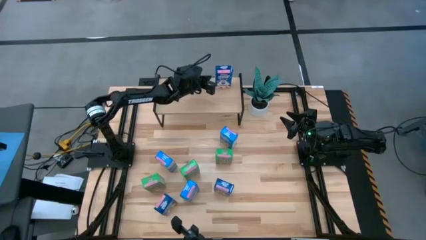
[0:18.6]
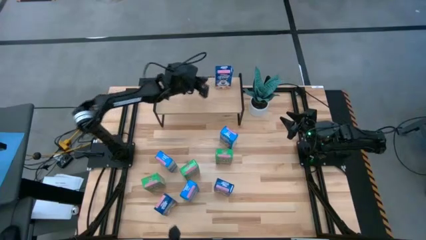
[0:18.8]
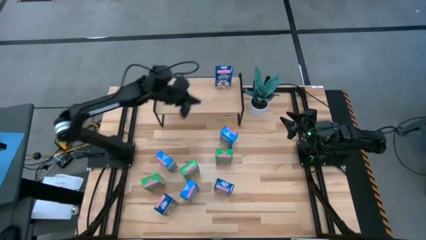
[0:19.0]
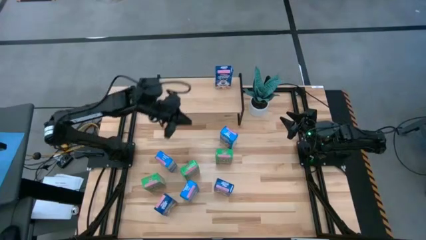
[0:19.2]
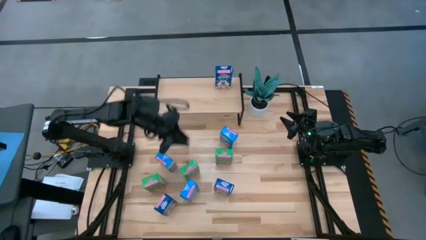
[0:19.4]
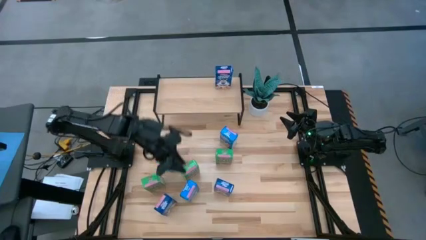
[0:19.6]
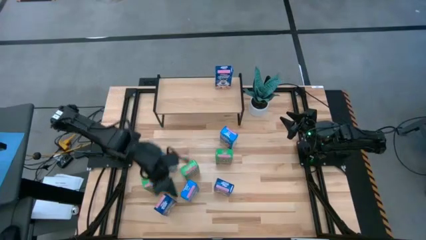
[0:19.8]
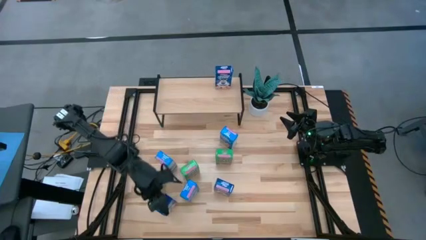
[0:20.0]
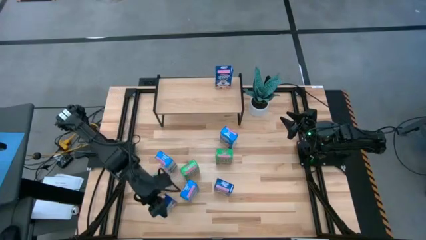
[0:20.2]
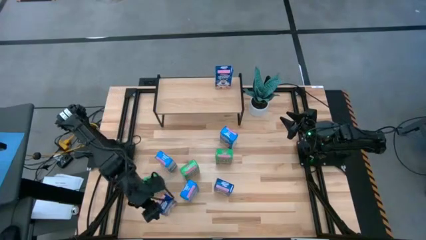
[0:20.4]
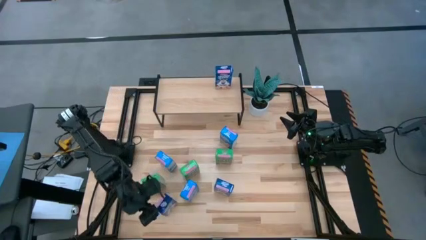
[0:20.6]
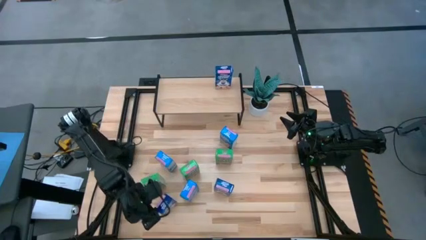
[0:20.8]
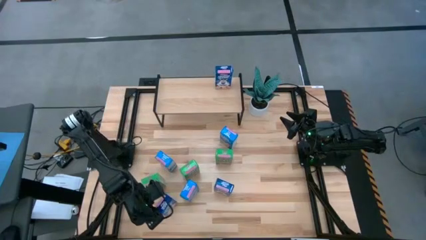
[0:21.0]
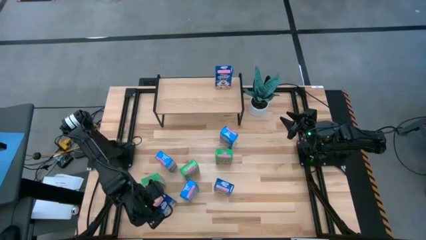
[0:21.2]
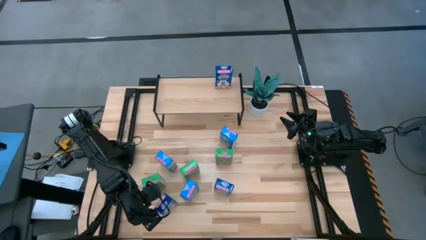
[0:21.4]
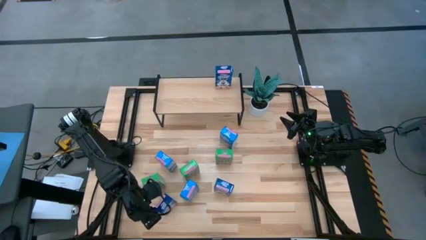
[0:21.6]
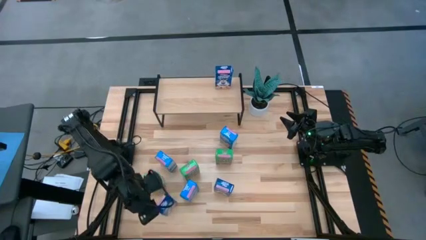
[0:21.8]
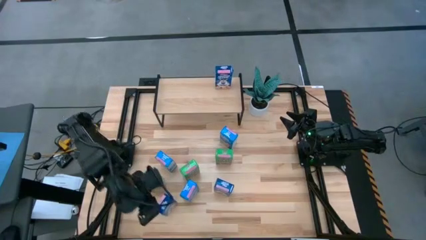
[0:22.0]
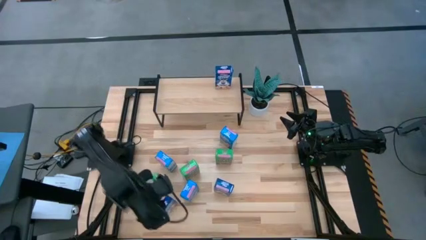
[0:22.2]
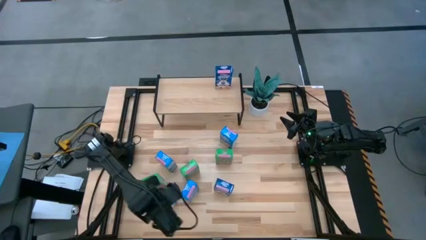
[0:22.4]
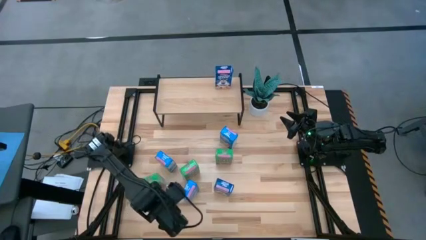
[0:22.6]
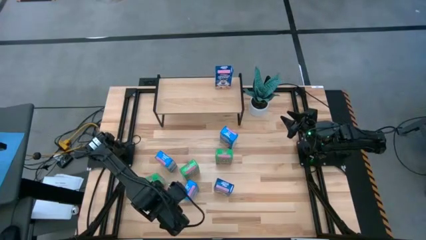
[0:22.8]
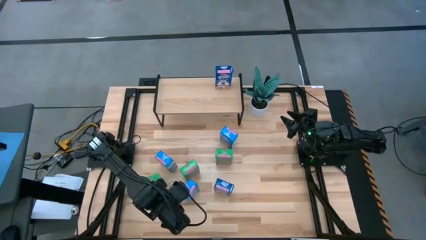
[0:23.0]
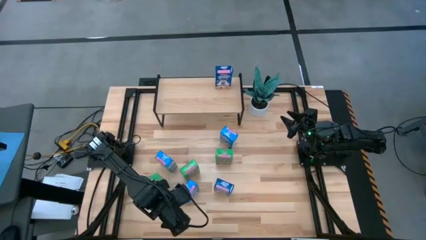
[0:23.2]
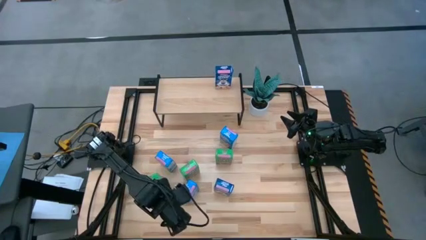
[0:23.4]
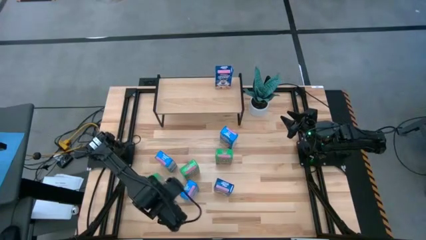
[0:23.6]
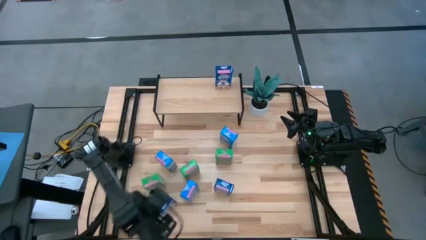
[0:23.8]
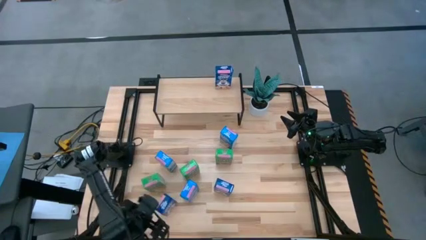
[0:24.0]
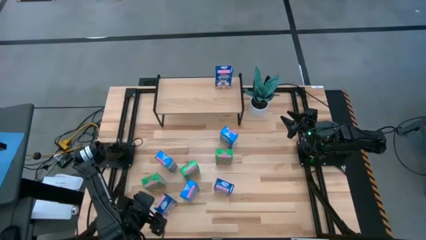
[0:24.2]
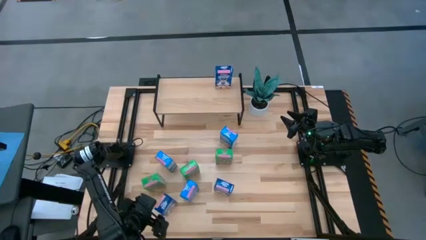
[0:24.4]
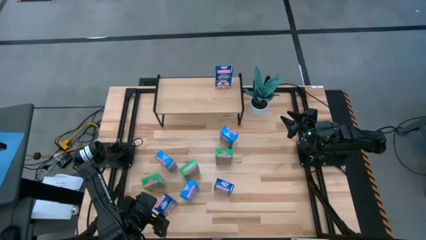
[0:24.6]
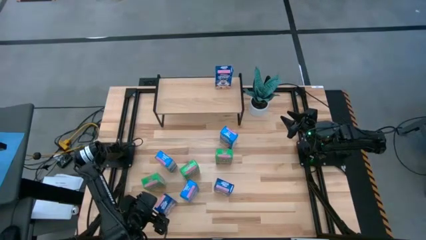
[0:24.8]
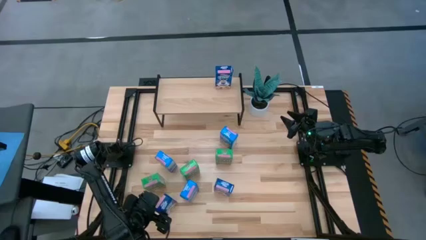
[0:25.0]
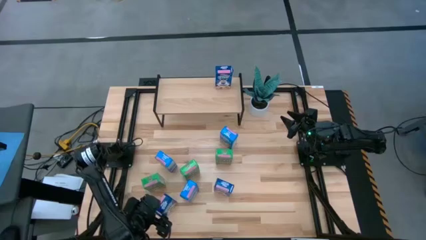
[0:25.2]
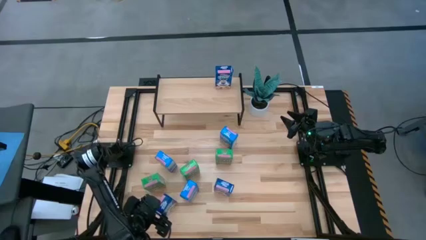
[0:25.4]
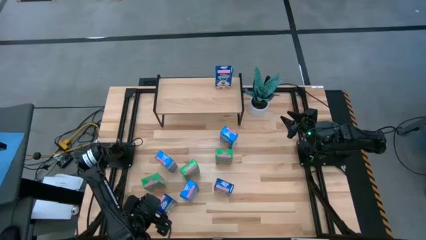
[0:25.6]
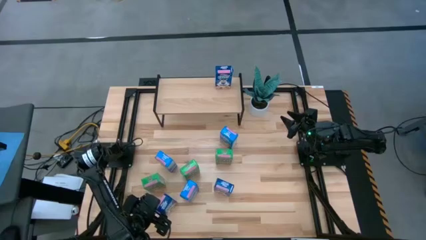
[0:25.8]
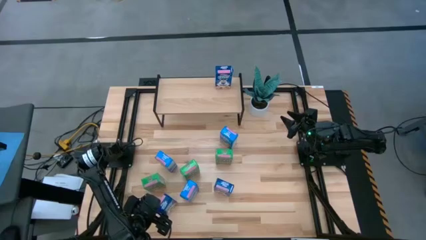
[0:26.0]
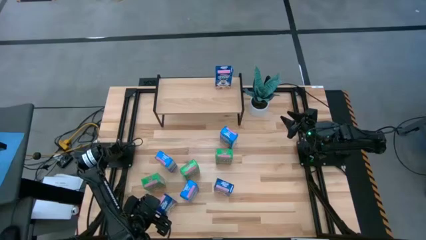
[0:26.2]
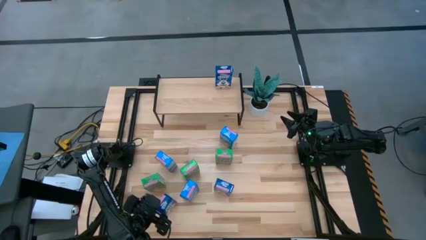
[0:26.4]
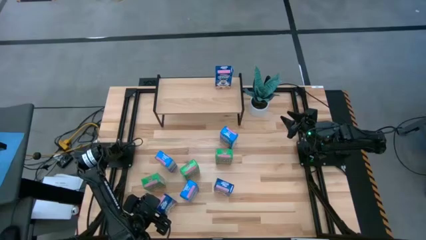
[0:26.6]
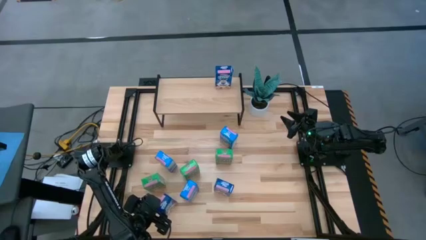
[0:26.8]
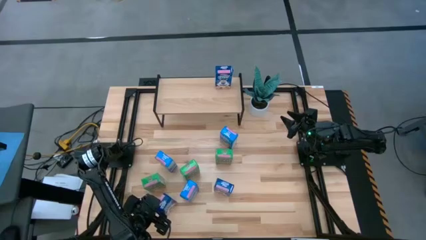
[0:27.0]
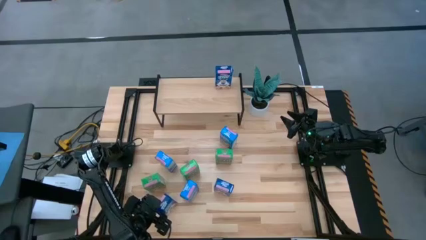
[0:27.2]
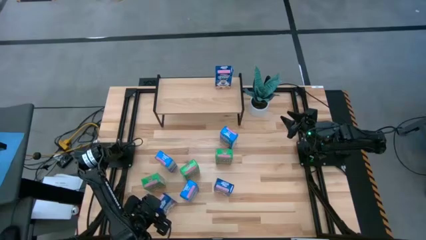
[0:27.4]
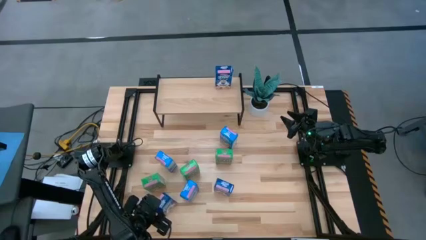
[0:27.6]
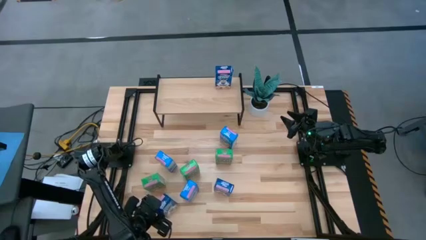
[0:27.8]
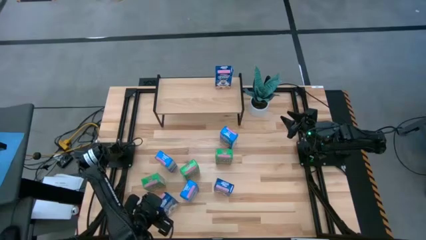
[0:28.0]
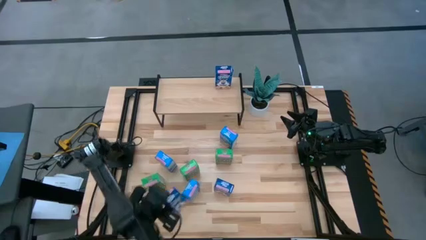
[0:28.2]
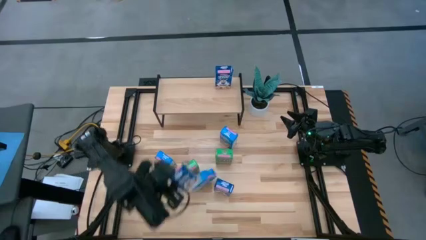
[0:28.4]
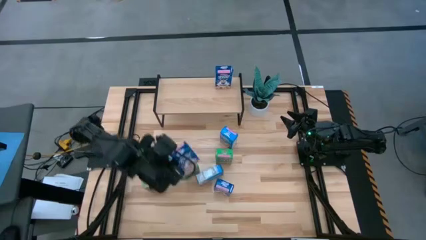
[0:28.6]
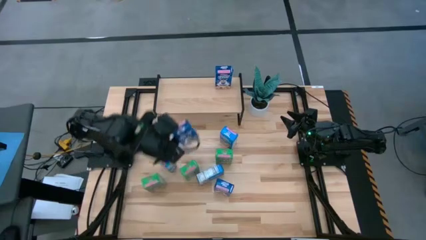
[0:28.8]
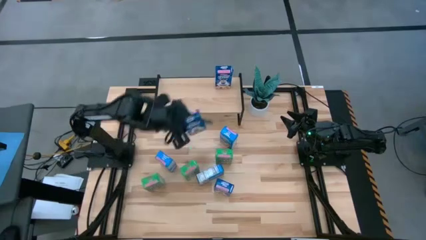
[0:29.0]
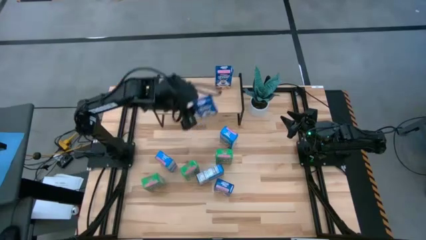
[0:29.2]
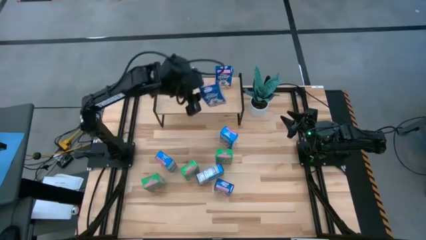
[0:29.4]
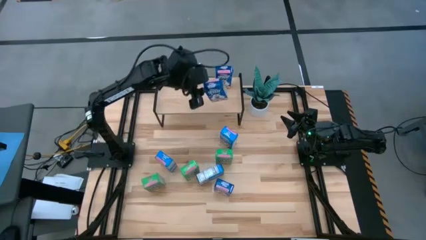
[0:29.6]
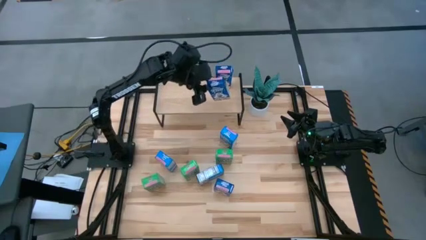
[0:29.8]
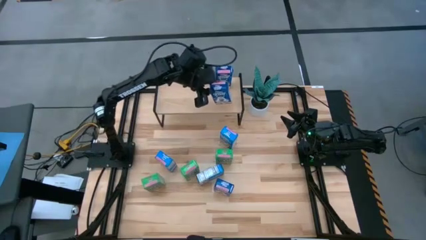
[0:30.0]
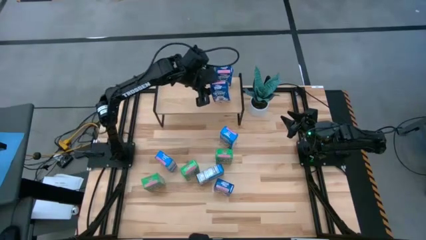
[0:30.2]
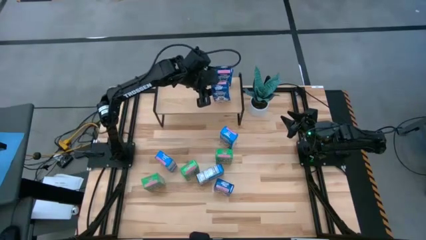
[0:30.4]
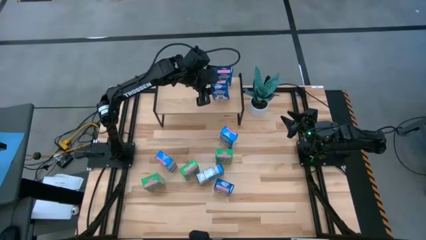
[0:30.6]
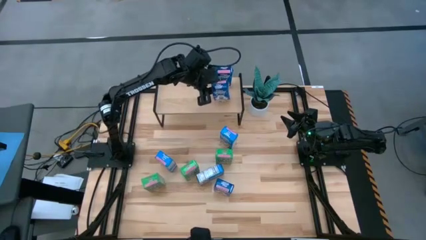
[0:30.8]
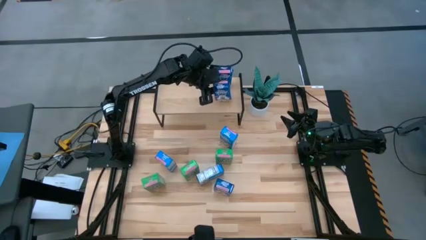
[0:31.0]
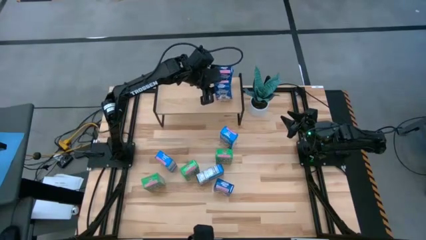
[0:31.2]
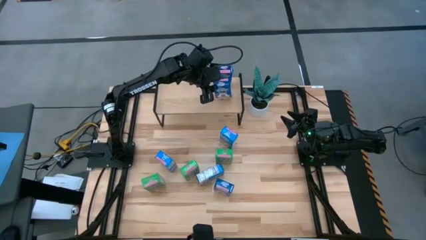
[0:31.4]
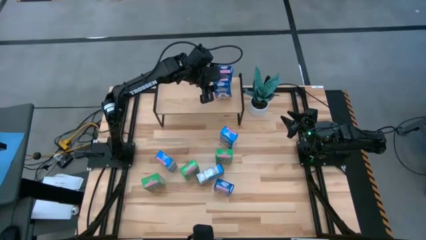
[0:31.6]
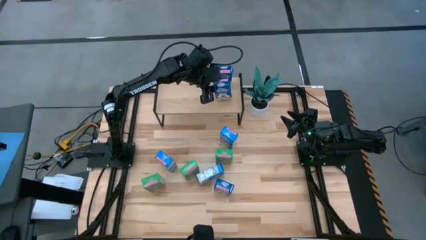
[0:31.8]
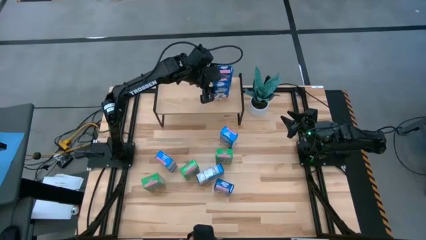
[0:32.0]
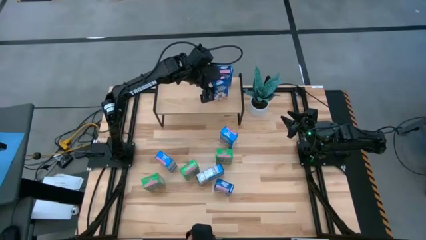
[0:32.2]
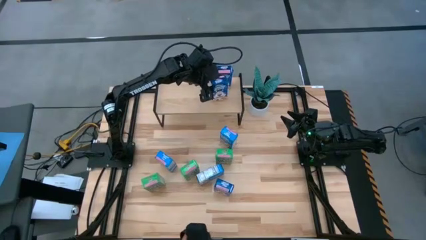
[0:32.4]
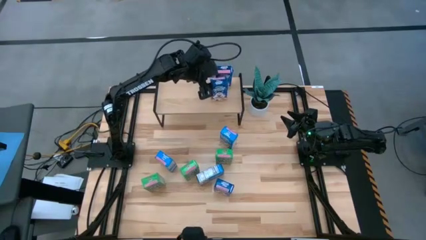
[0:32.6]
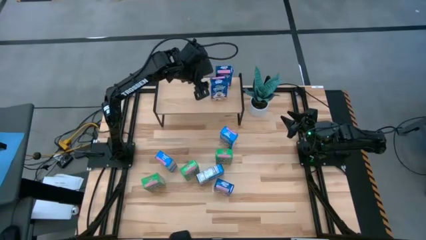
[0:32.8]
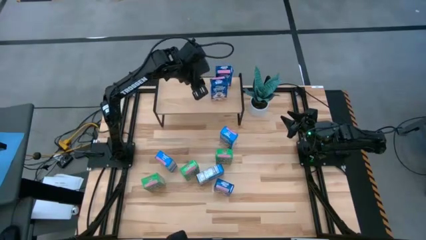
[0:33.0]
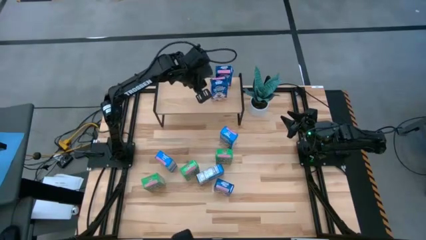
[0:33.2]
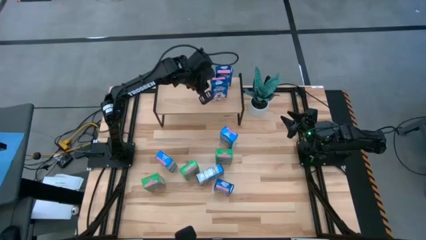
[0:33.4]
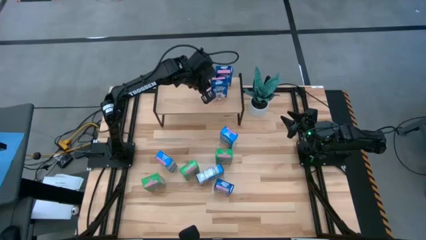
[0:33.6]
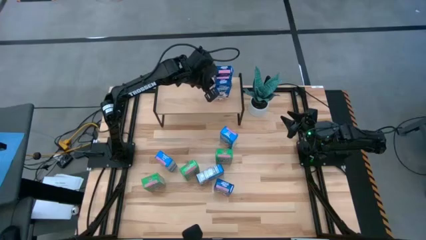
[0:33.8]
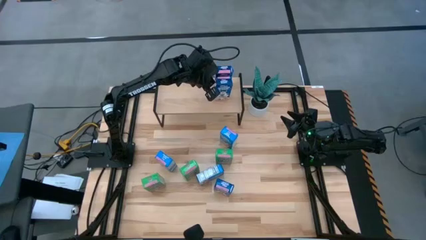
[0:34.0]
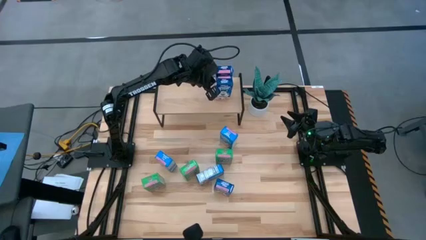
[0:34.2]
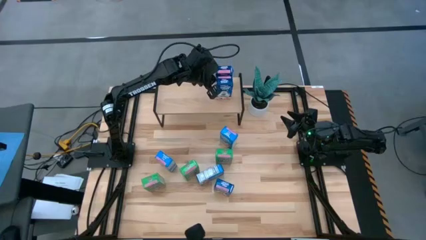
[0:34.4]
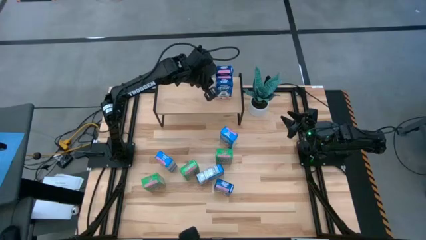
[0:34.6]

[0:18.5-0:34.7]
Task: Stack cereal on shelf
Put the bottom blue cereal box on the shelf aligned with the other blue cereal box
